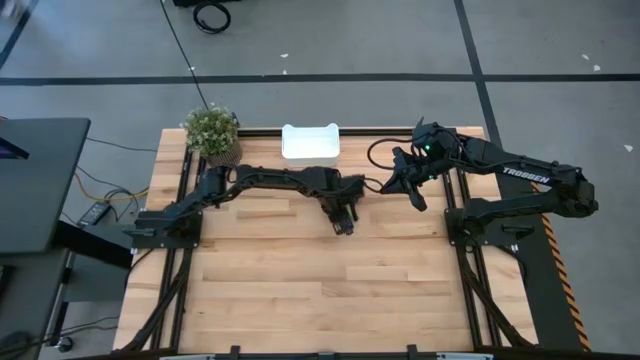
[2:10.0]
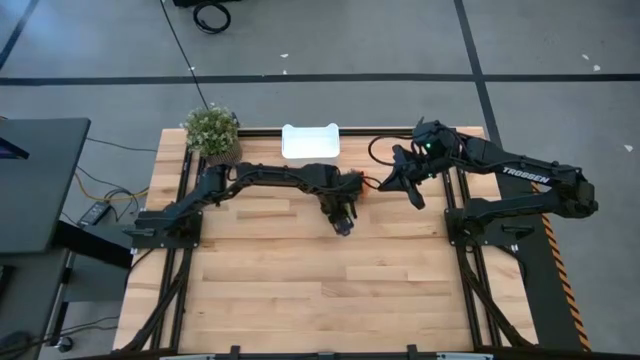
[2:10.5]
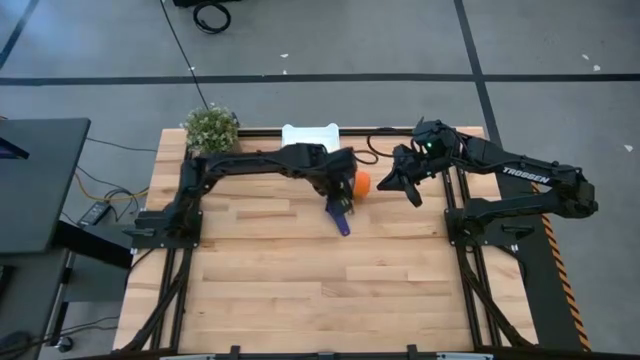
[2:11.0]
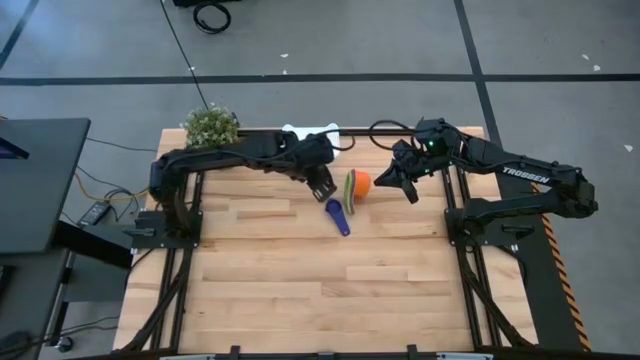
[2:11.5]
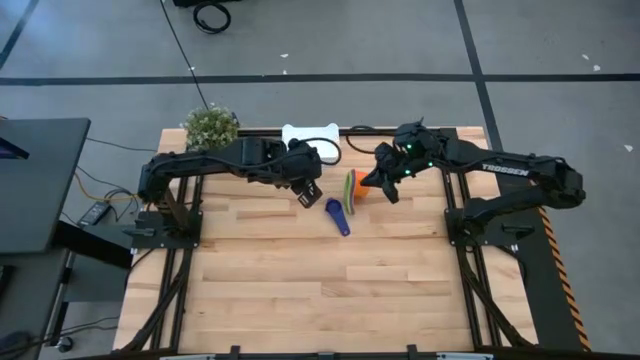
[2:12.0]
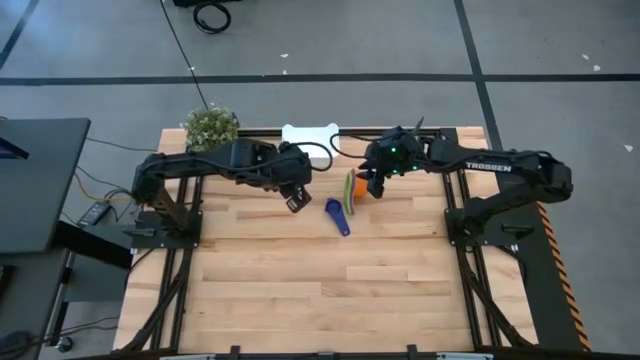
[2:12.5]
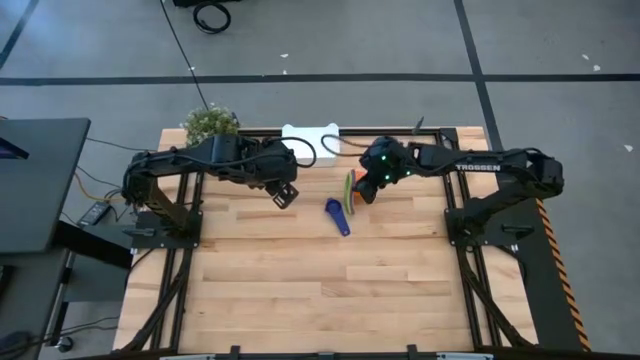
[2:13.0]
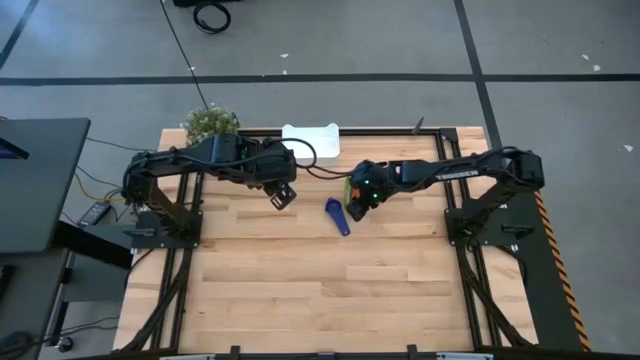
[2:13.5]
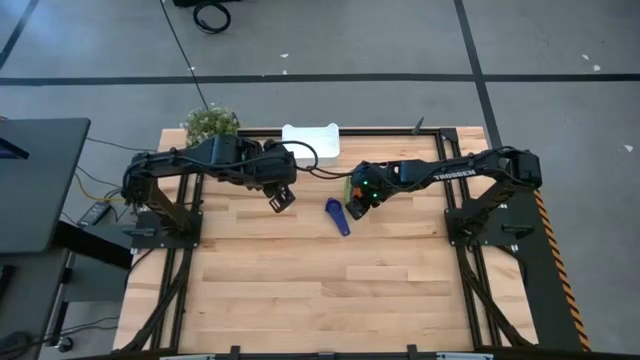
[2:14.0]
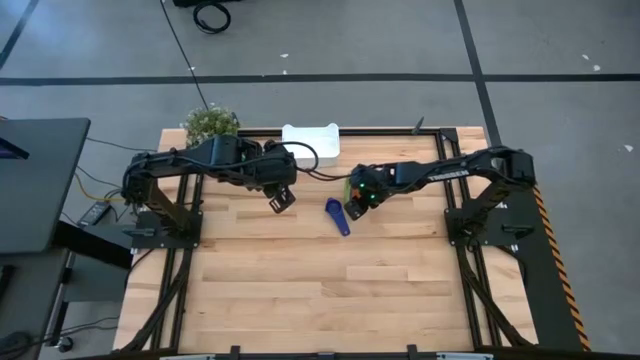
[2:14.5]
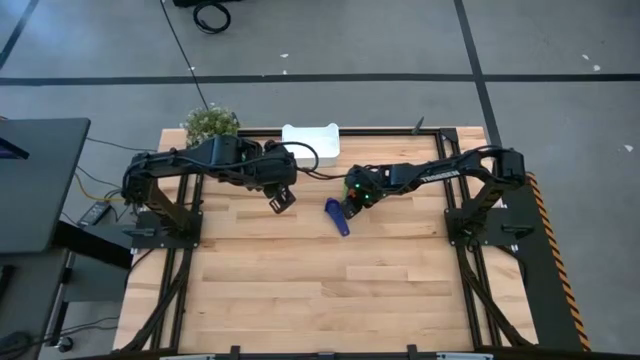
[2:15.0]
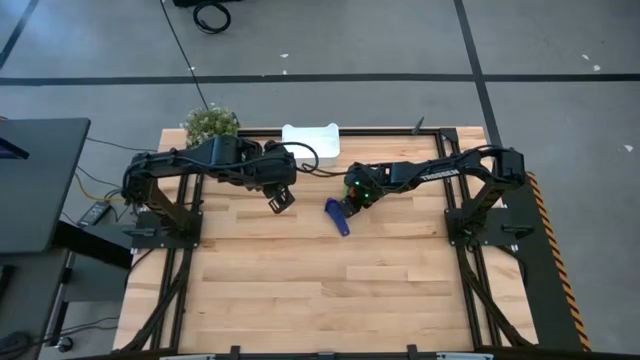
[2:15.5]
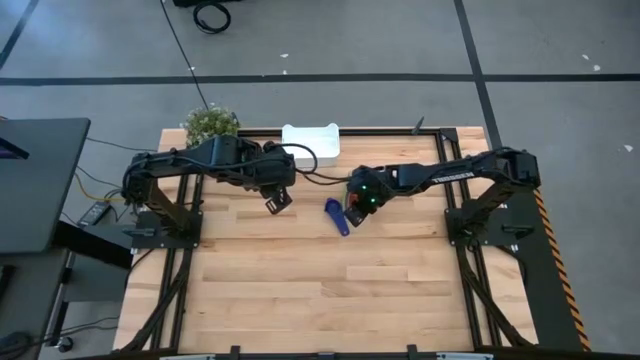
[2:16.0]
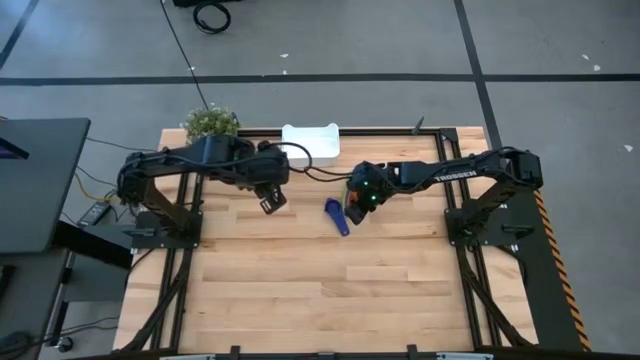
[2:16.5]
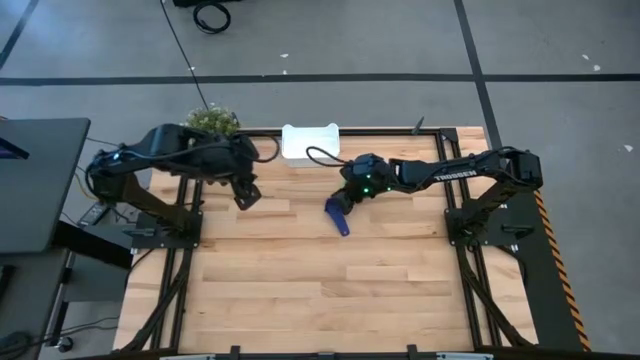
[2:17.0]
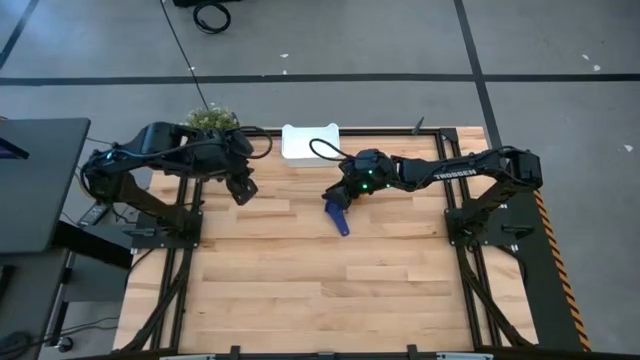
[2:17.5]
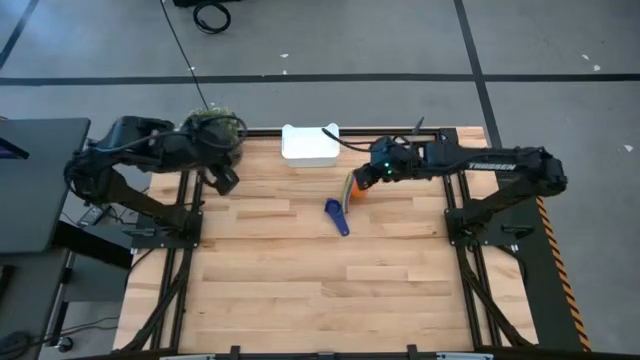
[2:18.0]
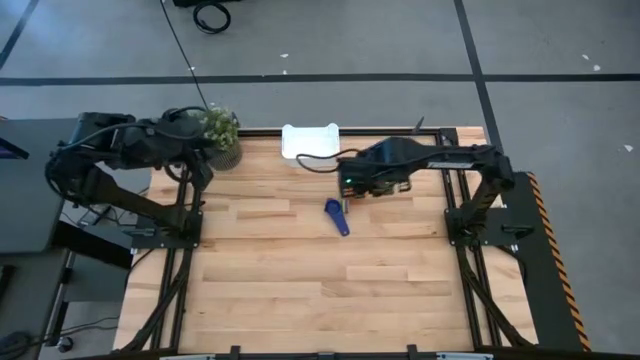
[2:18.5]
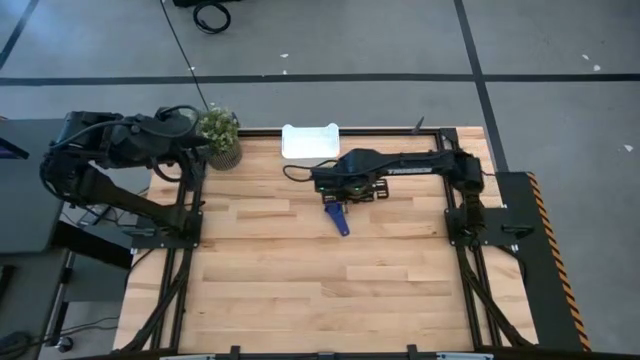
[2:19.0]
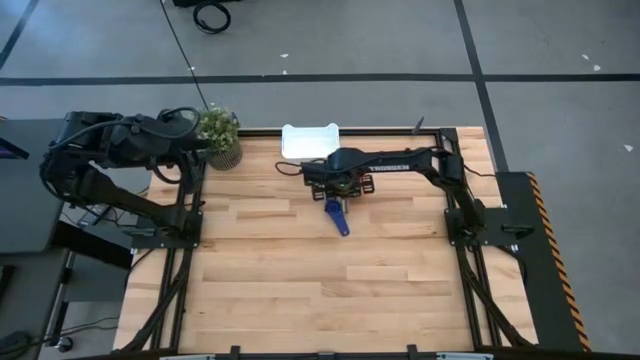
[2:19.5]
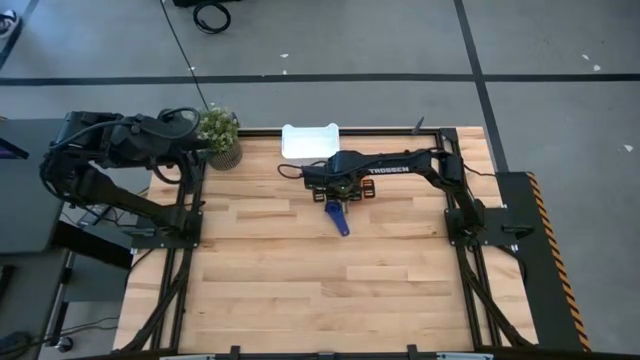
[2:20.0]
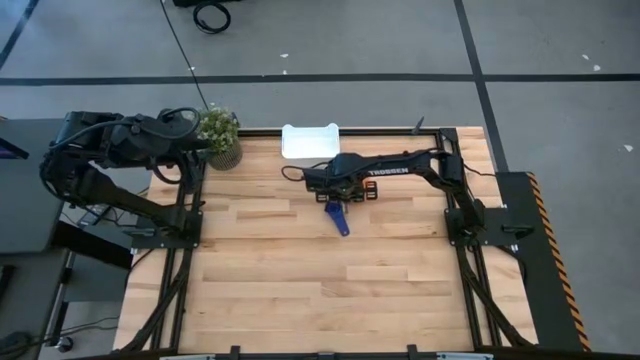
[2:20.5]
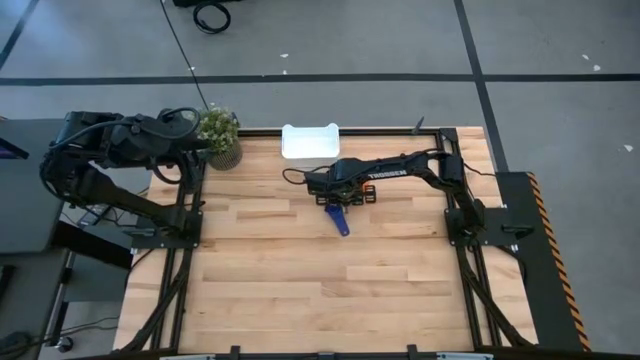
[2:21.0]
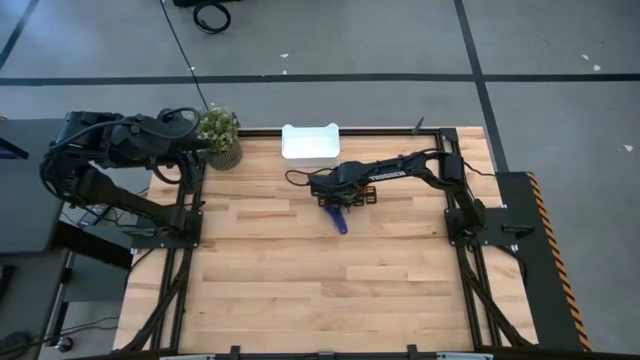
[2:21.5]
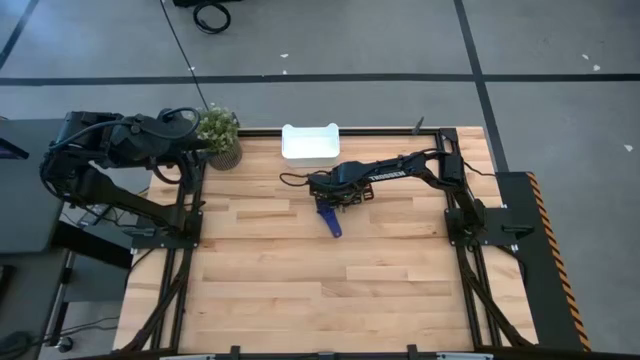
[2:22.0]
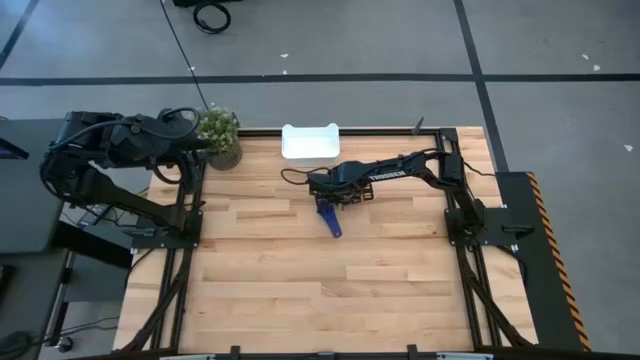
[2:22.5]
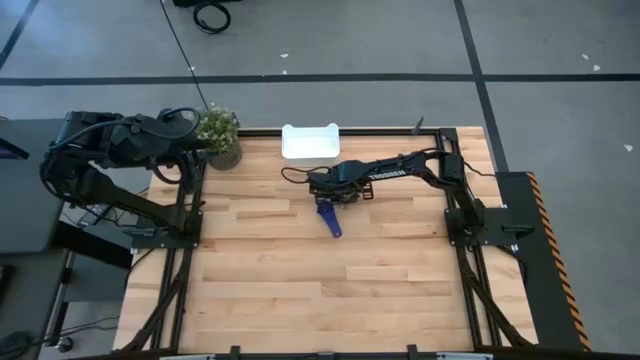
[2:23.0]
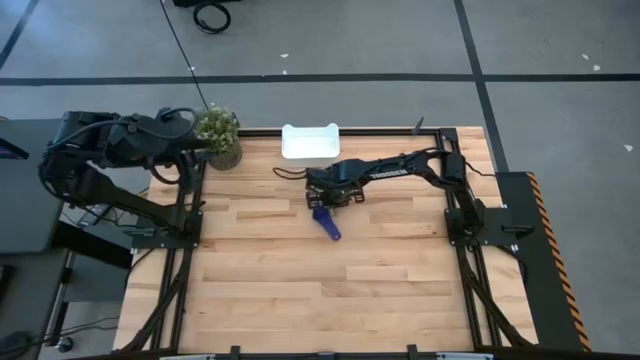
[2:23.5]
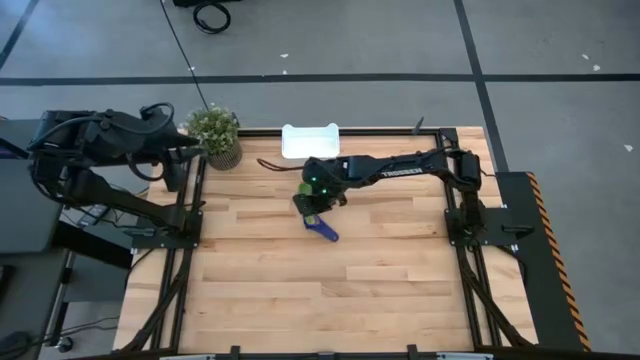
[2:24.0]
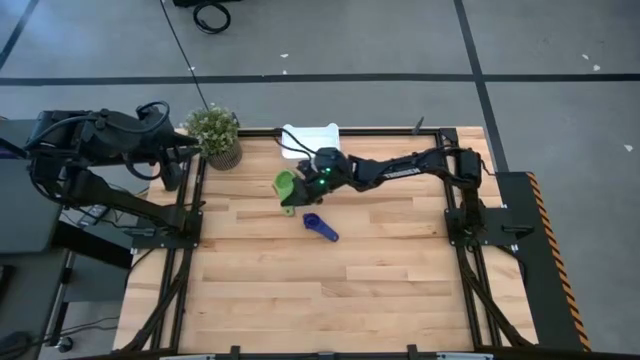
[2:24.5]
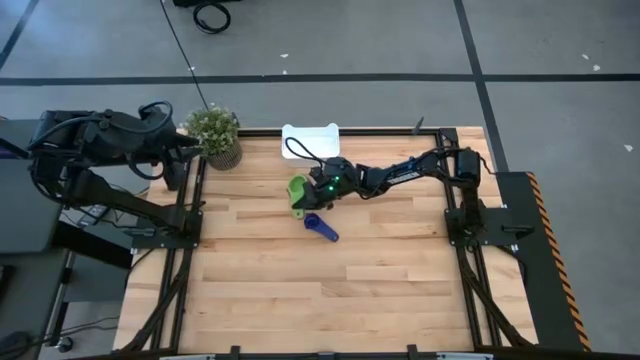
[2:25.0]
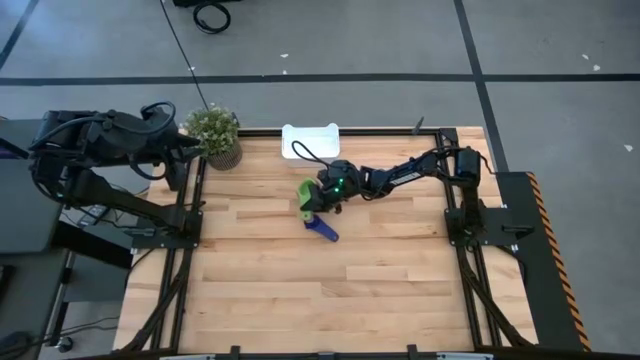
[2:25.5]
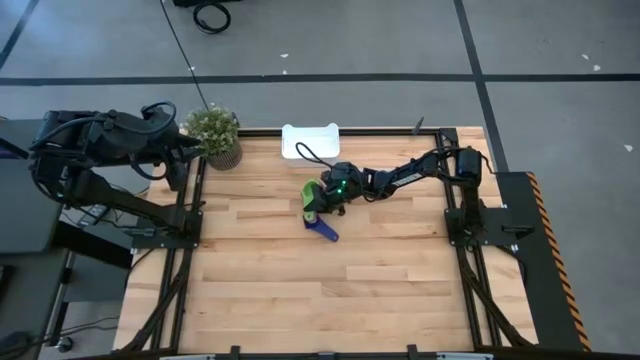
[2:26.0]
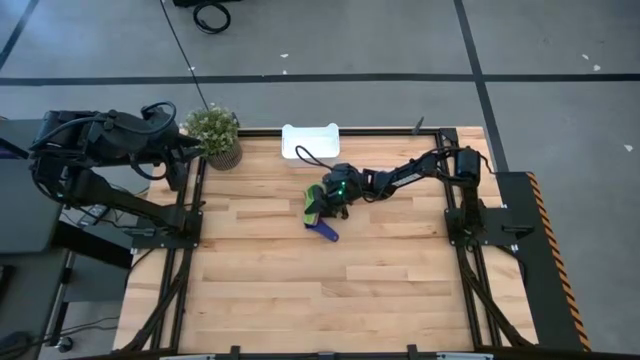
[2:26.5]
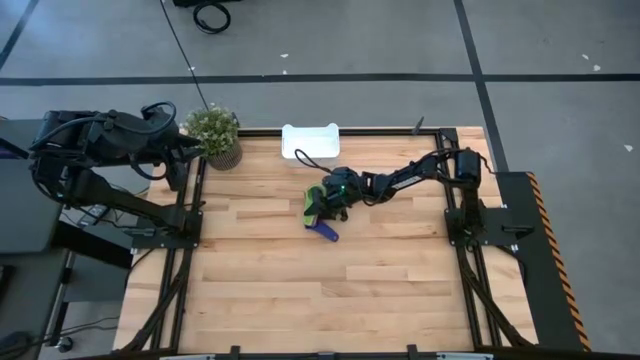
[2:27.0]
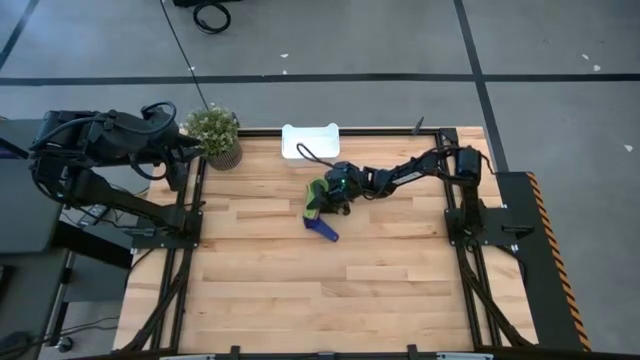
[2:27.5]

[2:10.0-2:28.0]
Task: Nest measuring cups in basket
Adjust the nested measuring cups
